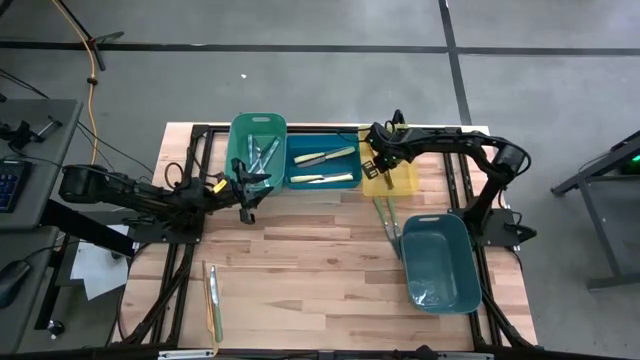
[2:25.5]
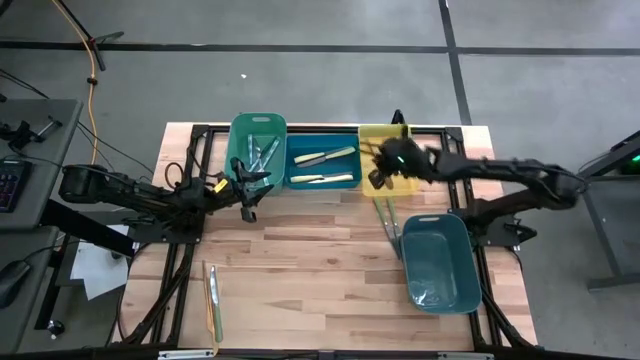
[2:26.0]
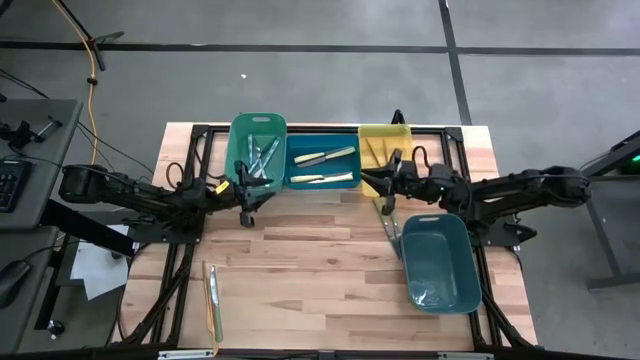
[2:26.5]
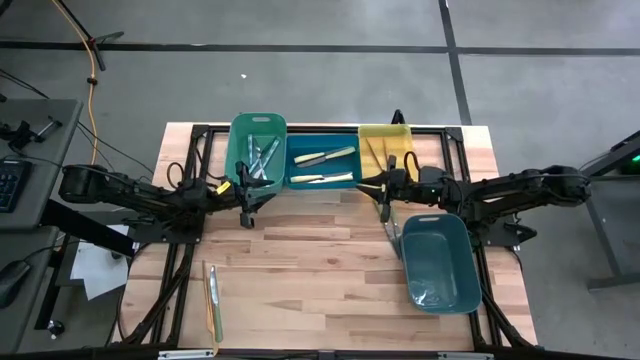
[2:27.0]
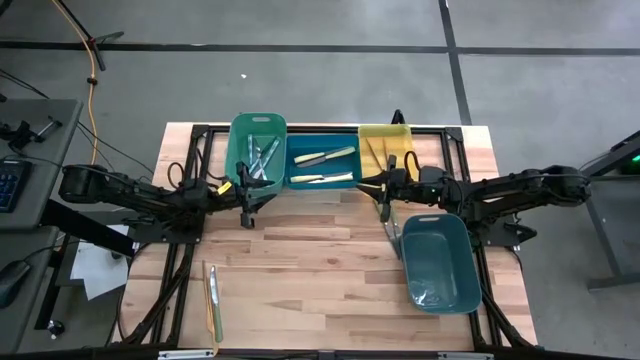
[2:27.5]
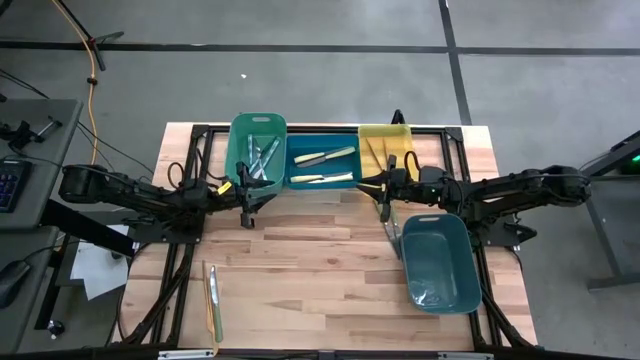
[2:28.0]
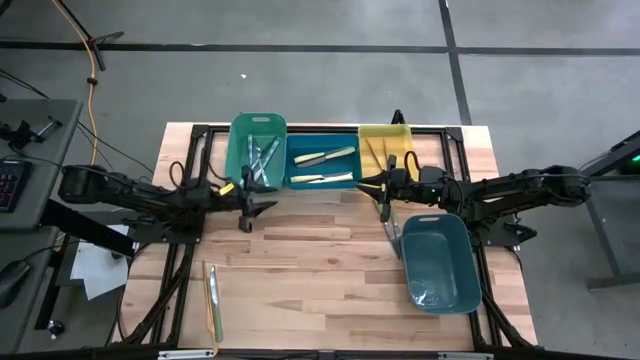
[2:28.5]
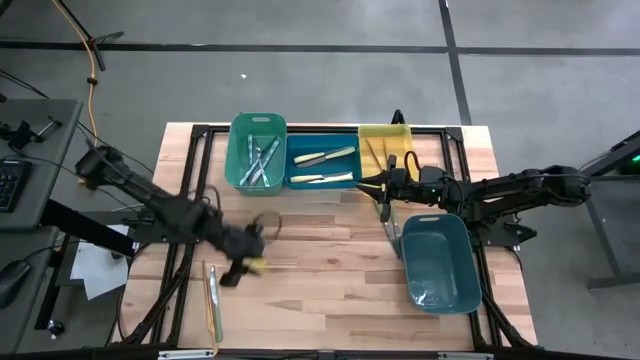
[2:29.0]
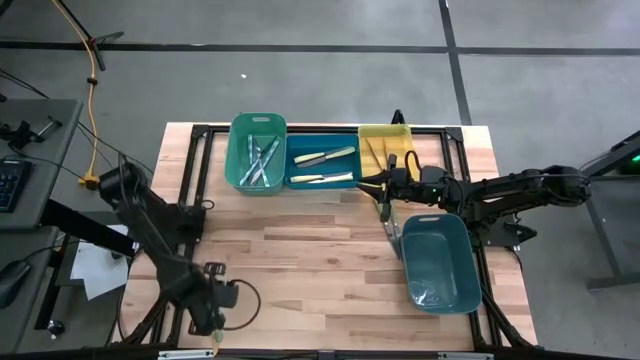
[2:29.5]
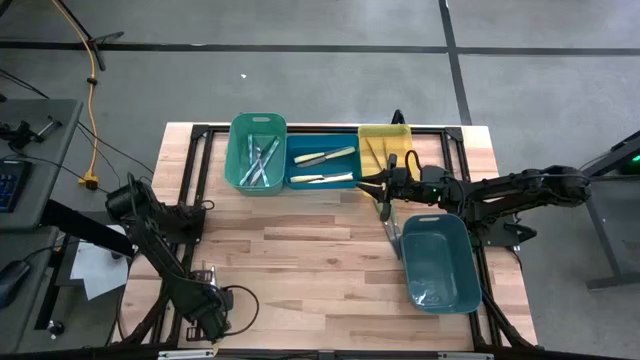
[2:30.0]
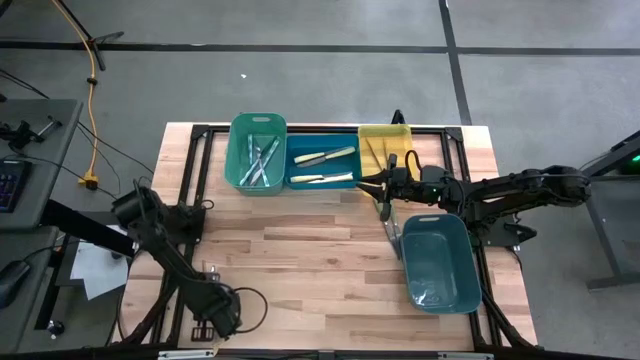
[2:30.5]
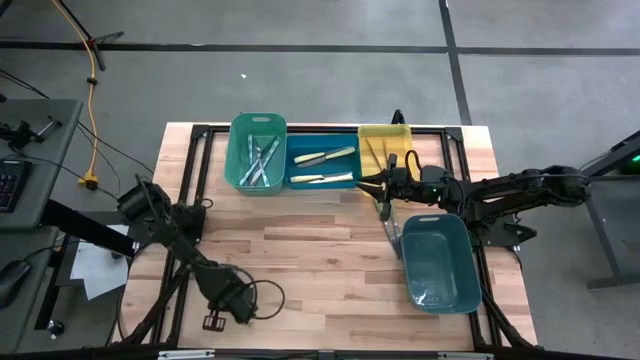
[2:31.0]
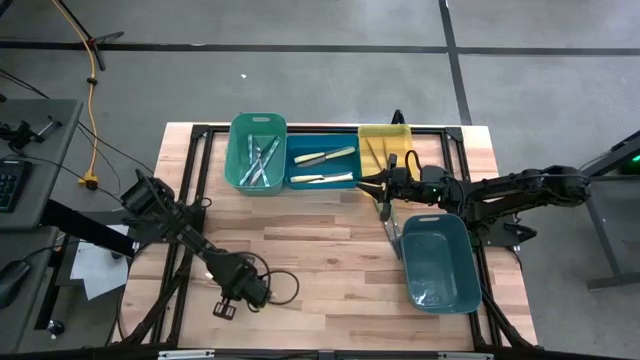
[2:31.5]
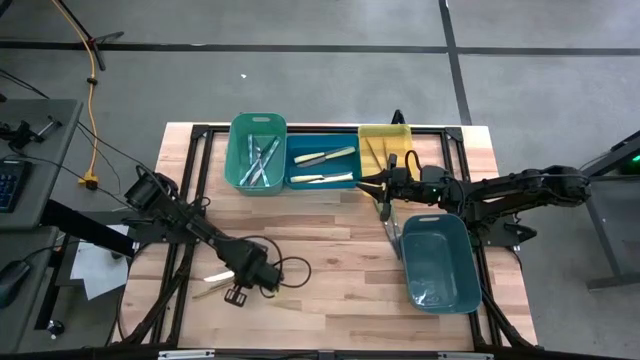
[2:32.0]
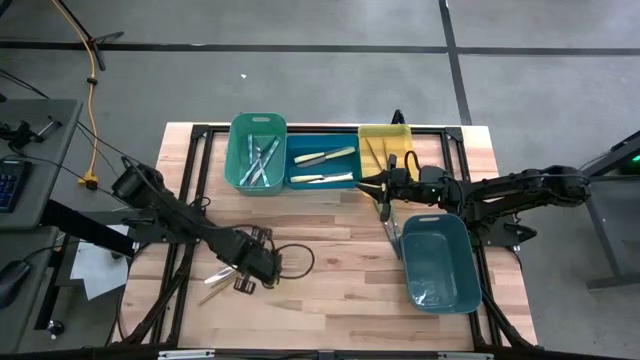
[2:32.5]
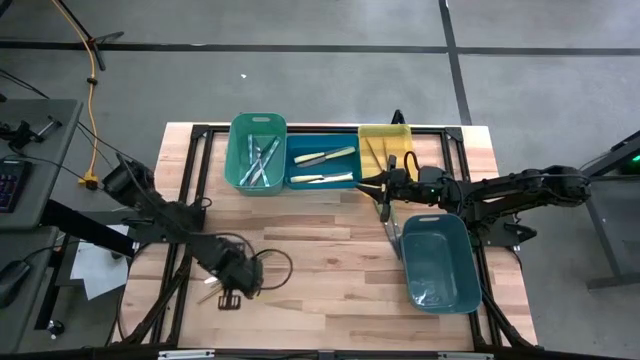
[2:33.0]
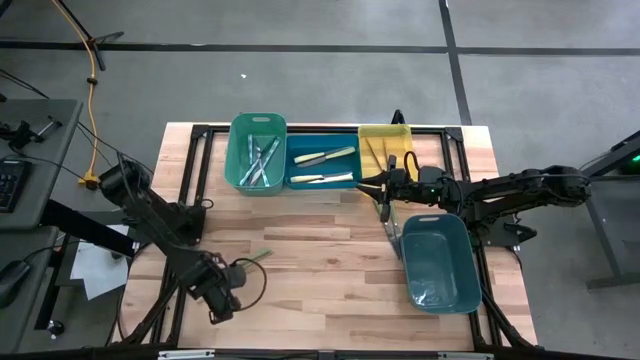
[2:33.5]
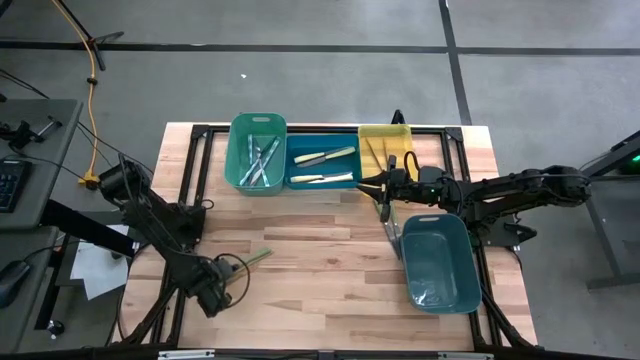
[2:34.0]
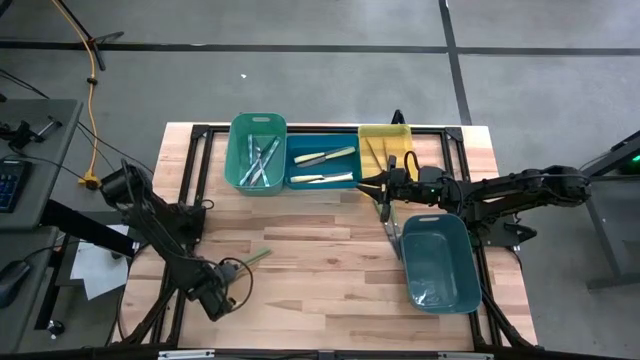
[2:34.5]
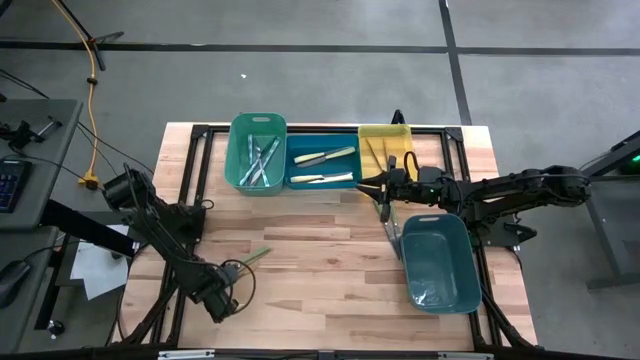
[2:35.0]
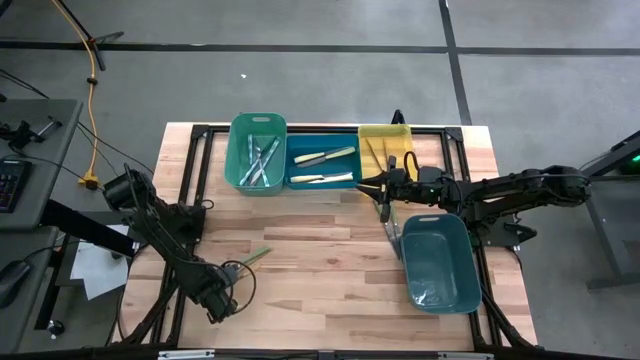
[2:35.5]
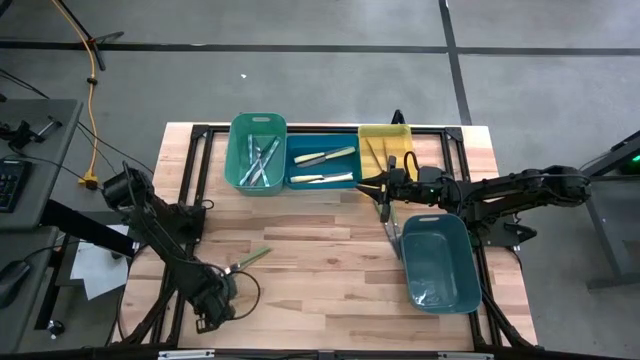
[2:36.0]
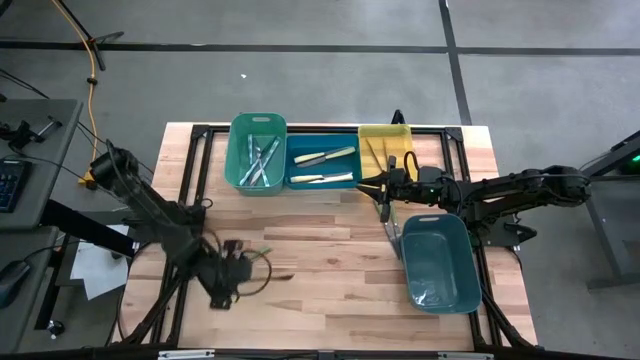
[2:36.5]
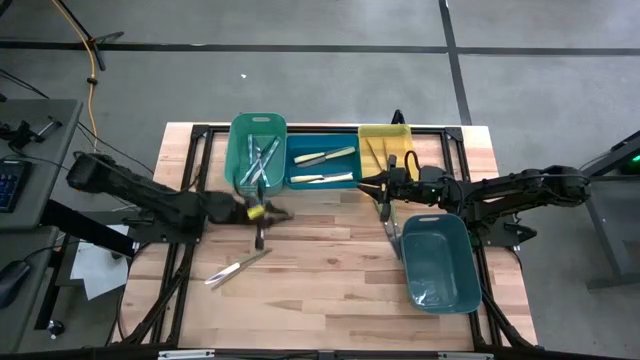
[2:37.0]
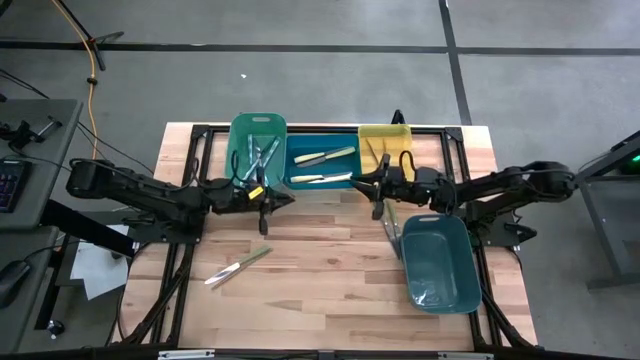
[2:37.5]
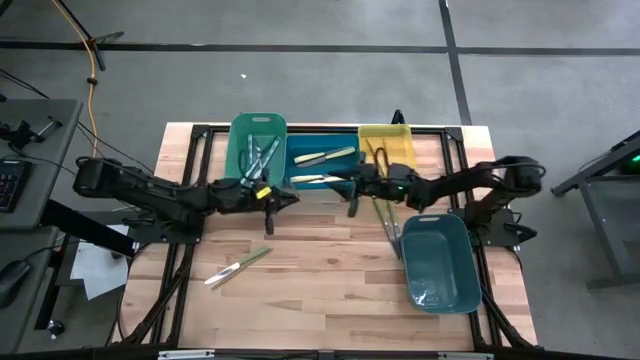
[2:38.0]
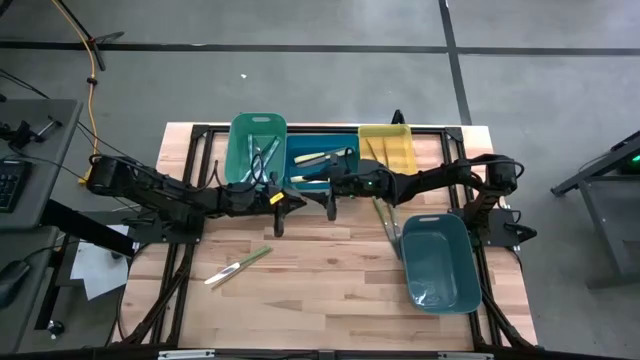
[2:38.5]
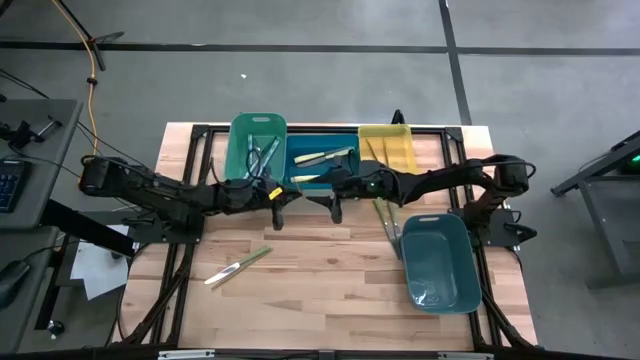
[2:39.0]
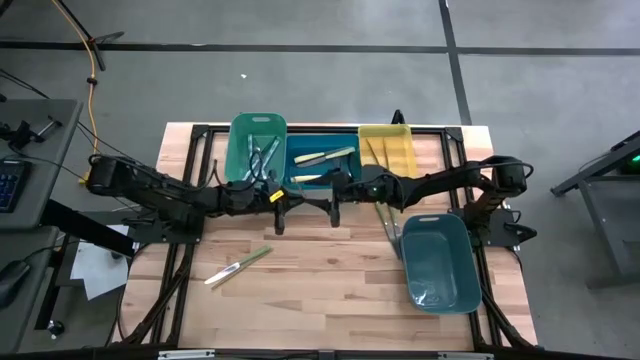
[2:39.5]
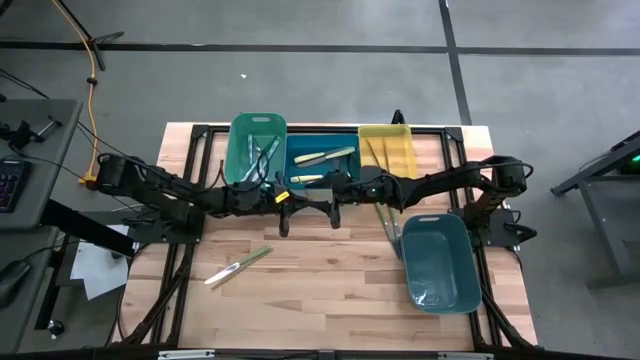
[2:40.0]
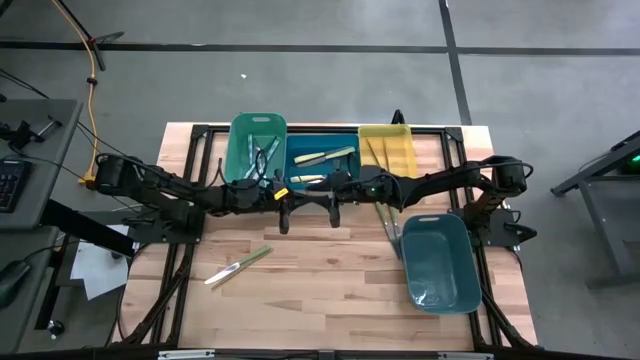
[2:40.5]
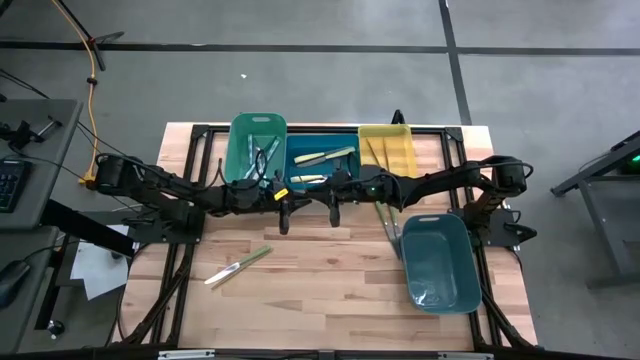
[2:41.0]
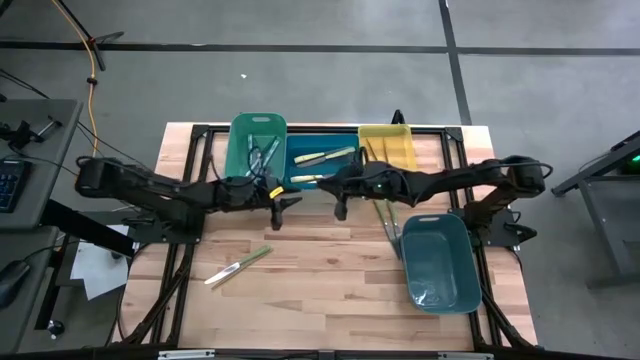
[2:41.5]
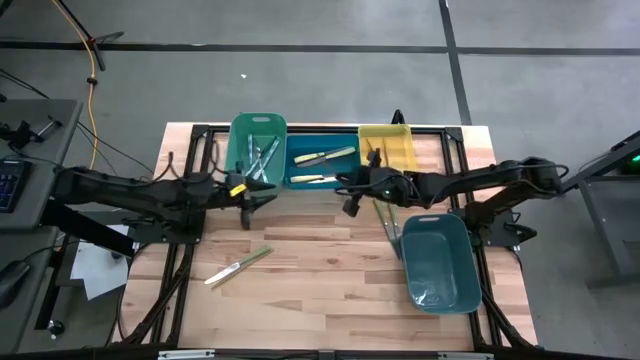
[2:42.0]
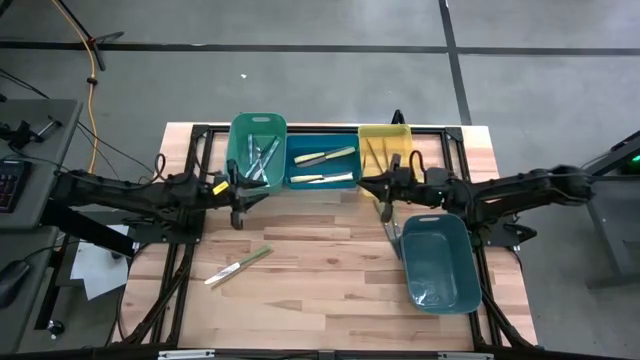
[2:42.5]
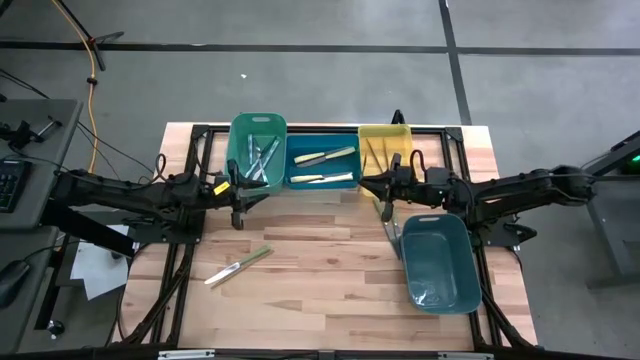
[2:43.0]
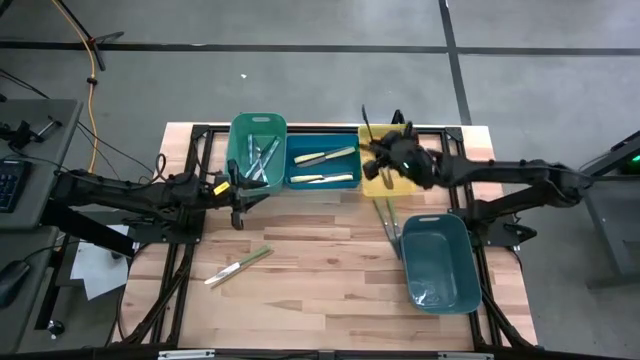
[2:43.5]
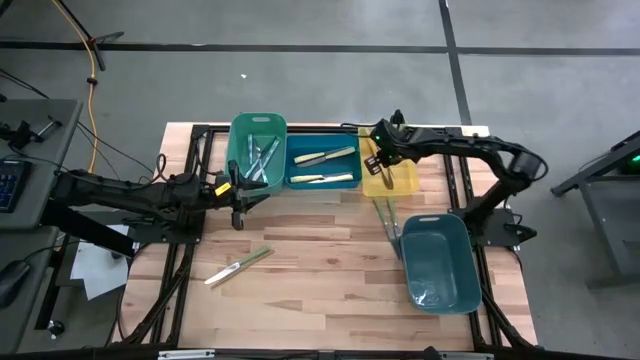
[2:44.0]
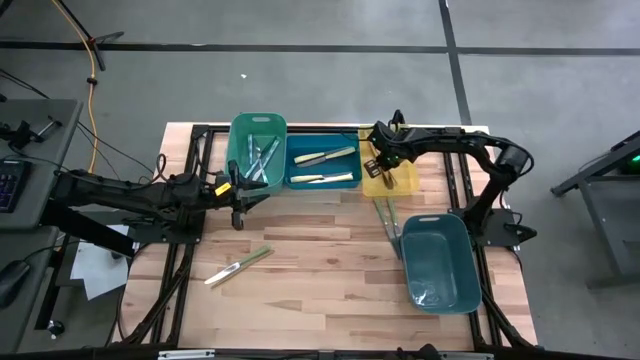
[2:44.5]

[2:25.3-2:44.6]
Task: Sort silverware by color (type)
Put the gold knife into the yellow bin
